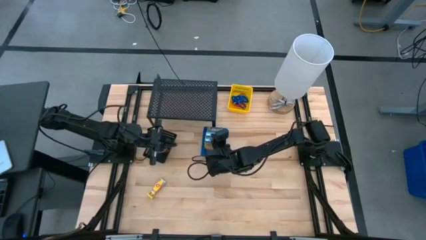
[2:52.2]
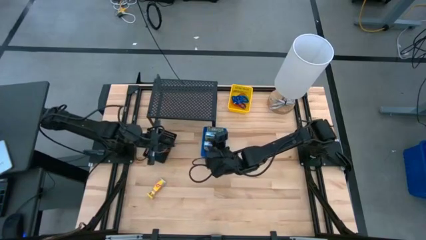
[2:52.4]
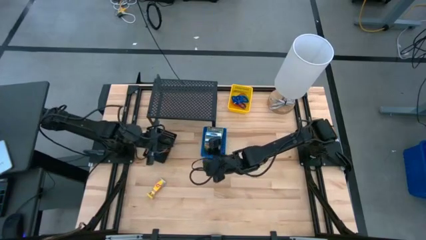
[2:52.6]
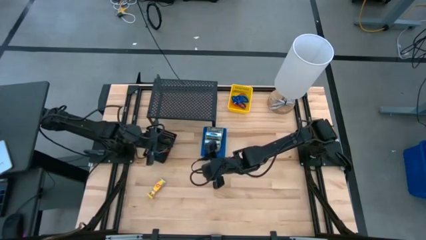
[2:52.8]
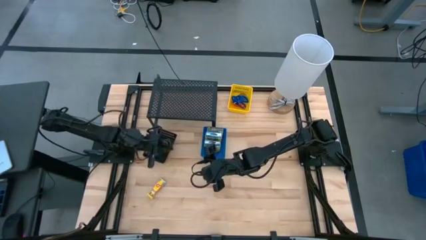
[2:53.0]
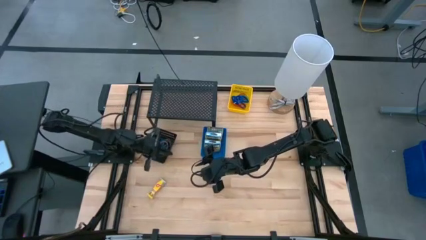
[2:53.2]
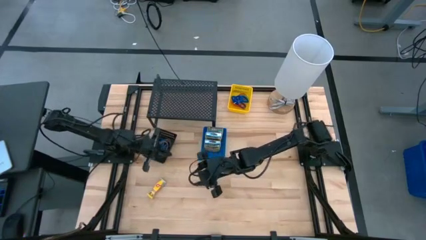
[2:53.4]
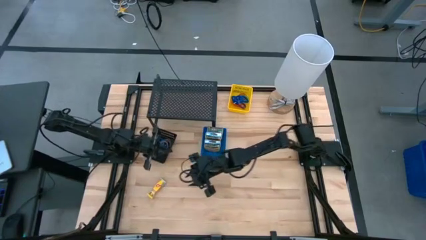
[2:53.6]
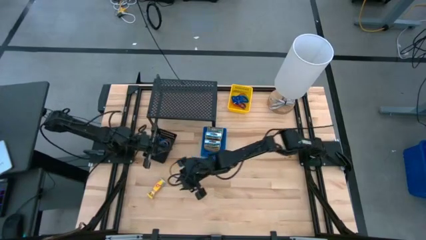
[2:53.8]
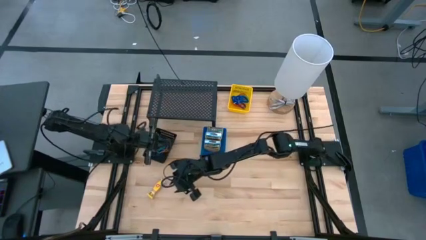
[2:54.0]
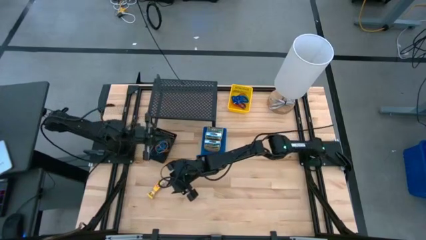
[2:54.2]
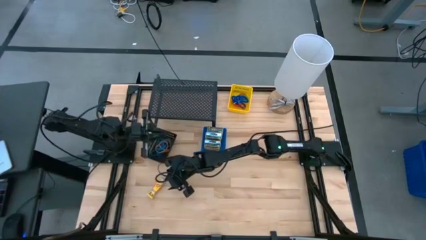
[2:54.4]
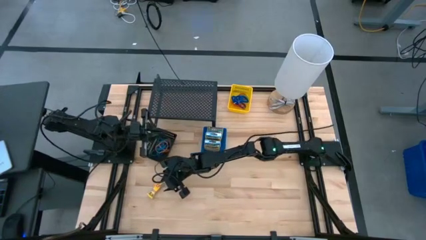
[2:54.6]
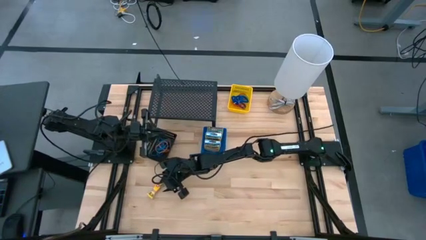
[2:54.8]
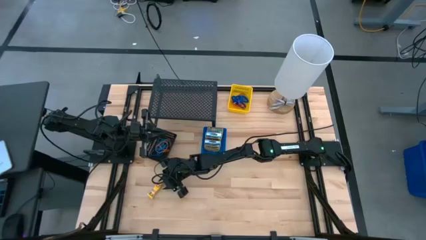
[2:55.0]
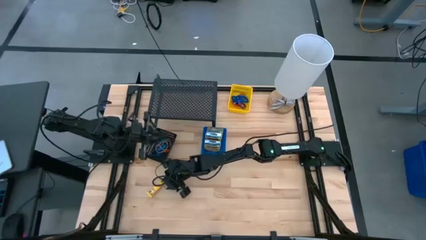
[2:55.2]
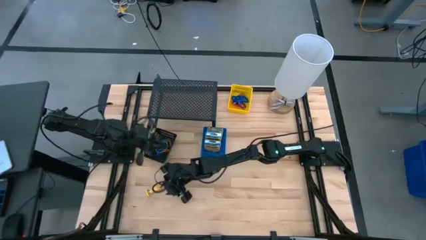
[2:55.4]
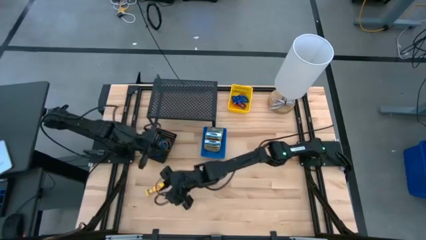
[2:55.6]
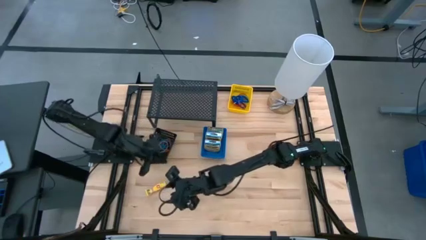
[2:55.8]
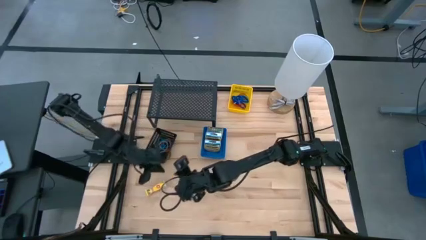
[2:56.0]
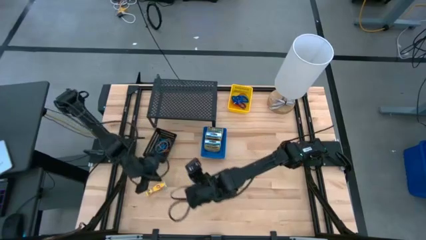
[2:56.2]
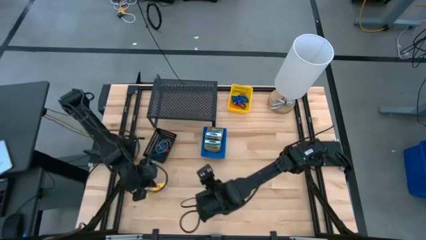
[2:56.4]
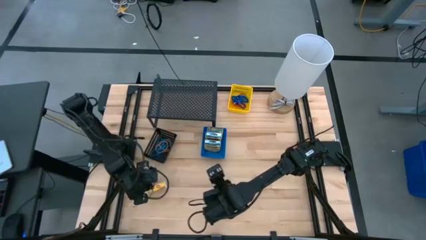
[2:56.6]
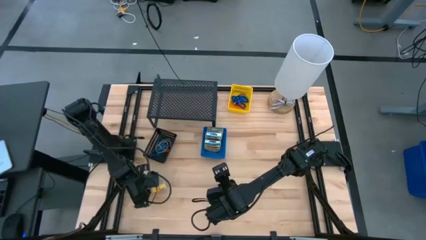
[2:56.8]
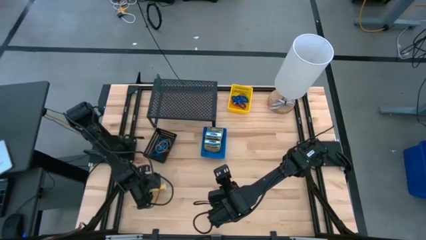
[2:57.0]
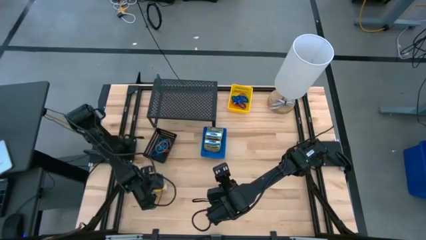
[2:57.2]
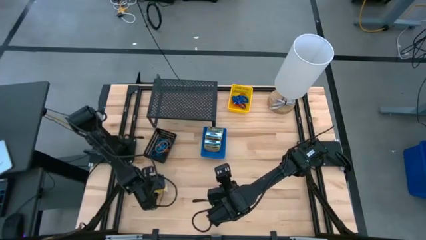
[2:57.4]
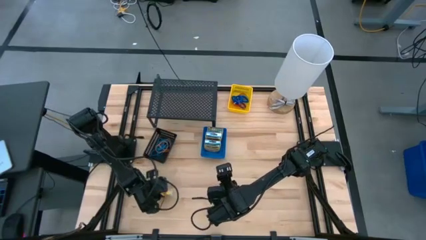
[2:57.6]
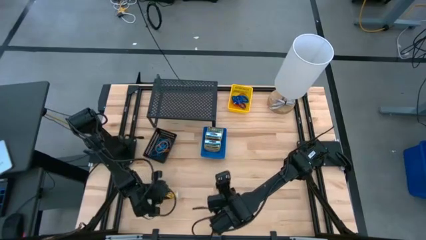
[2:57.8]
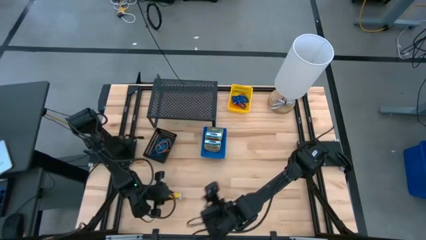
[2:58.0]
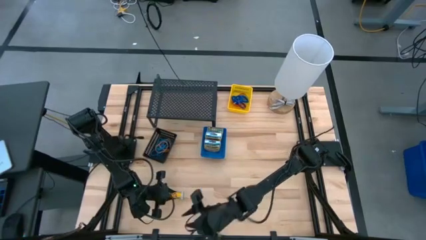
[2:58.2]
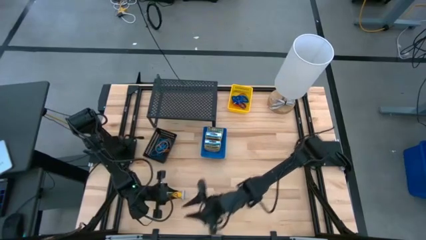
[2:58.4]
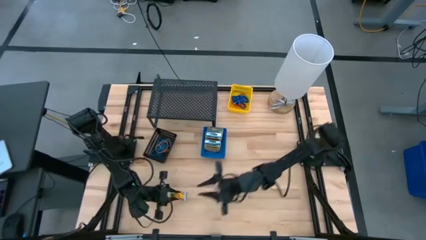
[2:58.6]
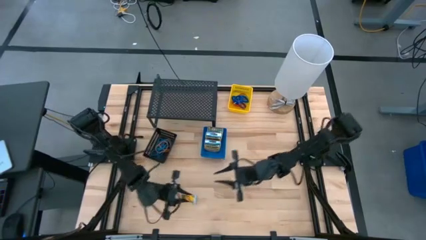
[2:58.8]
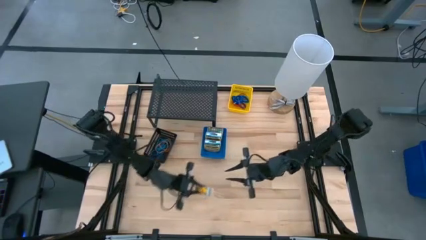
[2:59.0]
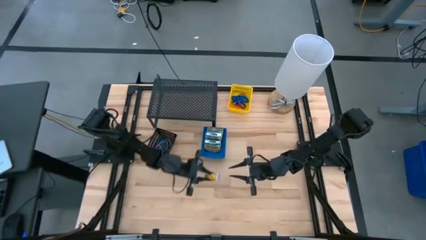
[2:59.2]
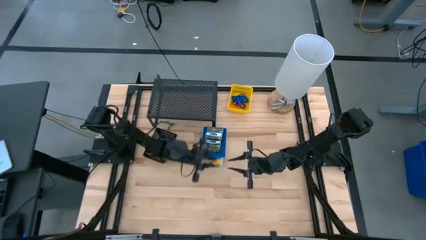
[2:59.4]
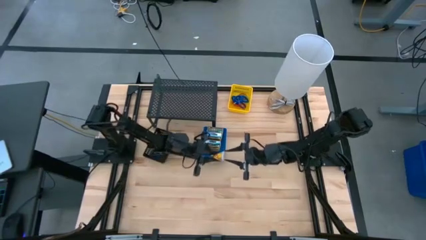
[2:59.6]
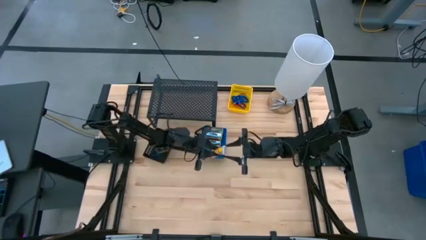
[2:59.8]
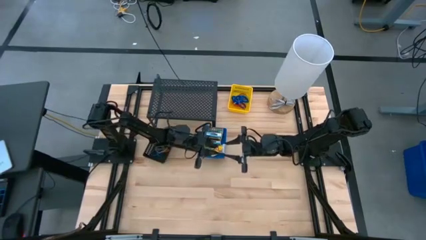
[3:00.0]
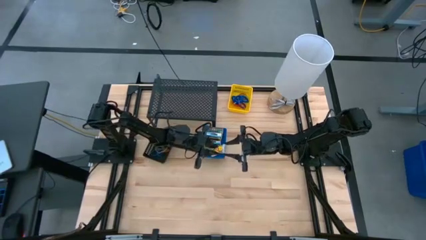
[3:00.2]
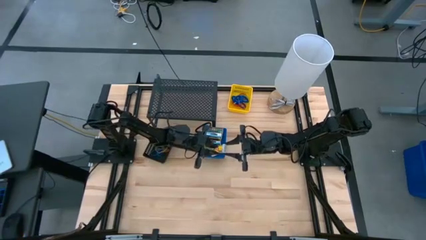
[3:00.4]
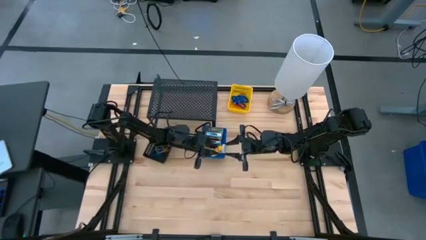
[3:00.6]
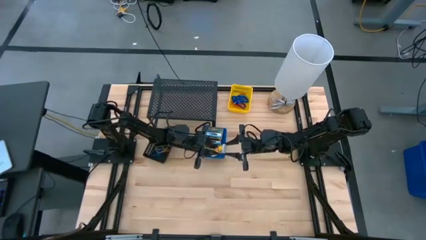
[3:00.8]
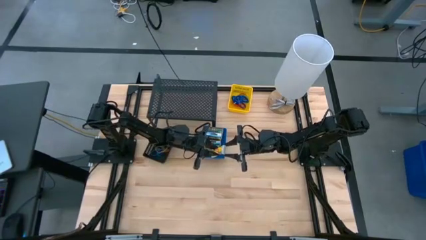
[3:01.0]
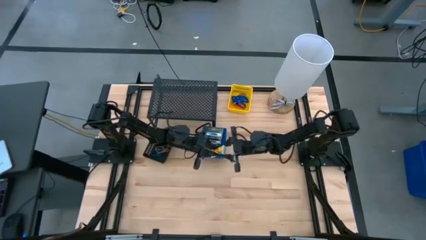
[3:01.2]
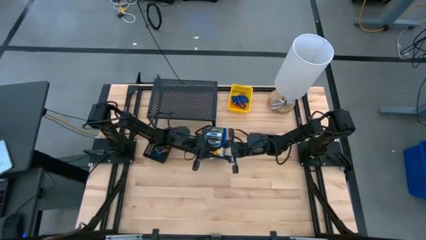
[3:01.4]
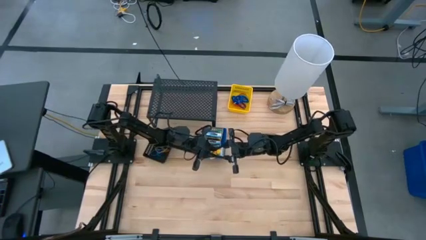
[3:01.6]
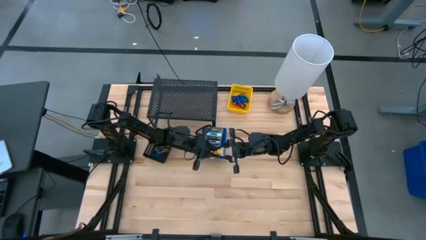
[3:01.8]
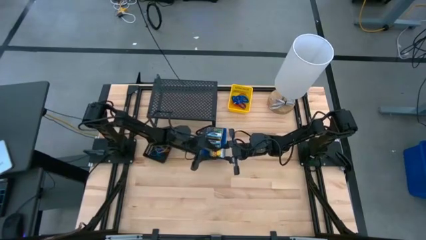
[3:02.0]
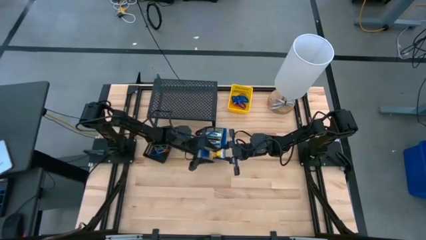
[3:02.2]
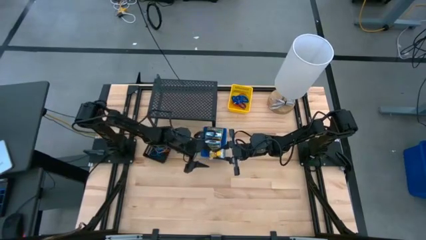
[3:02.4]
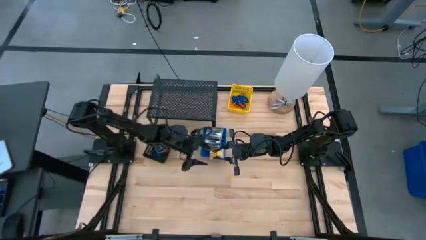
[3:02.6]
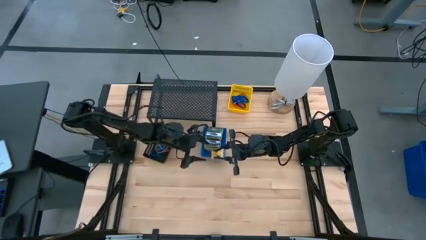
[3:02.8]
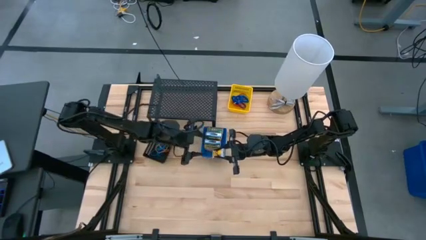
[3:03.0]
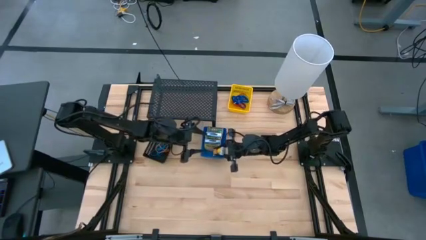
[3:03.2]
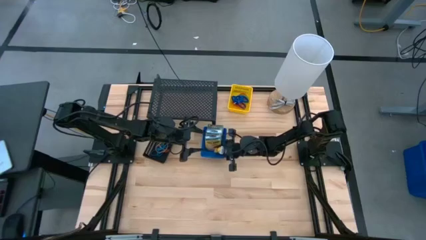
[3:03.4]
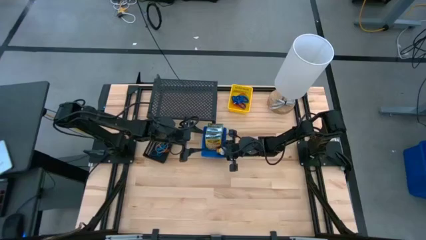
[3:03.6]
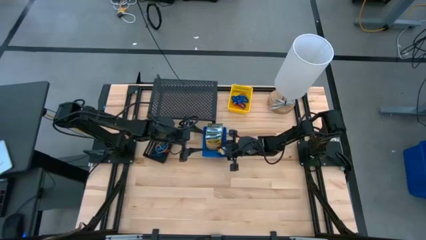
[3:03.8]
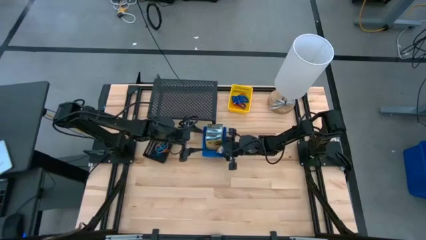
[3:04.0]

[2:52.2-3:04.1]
Task: Pick & Place Office Desk Supplies
Put the small yellow crayon box into the blue bin

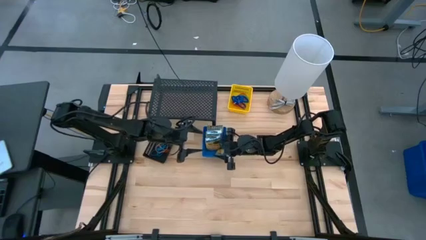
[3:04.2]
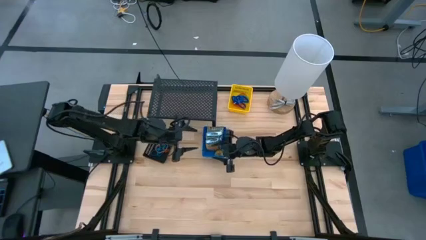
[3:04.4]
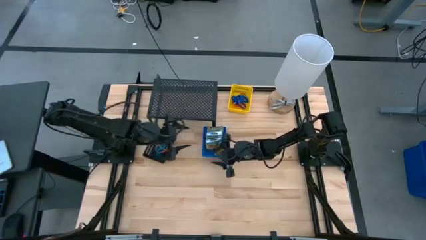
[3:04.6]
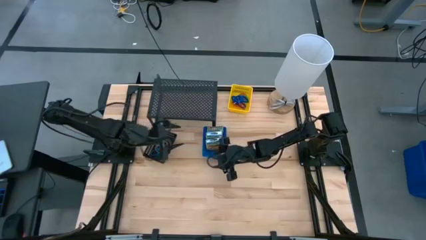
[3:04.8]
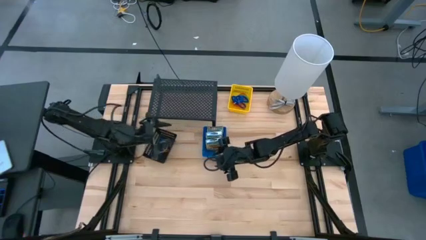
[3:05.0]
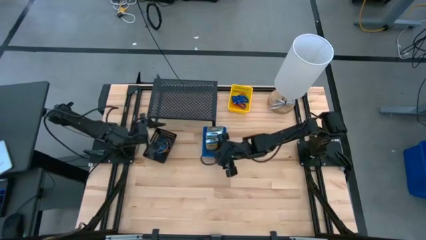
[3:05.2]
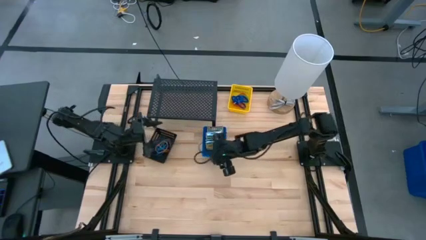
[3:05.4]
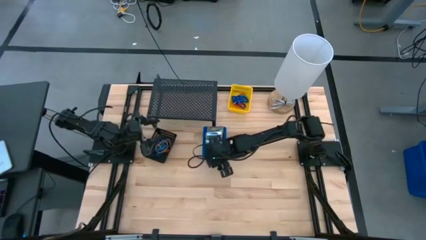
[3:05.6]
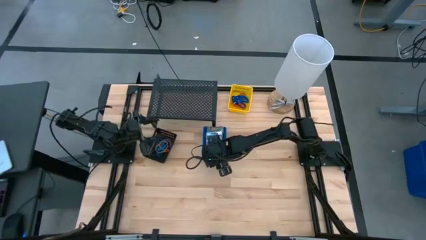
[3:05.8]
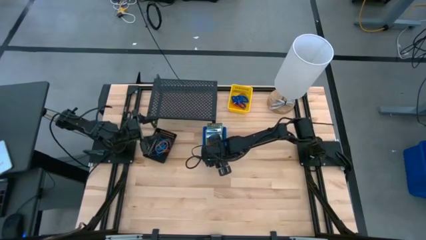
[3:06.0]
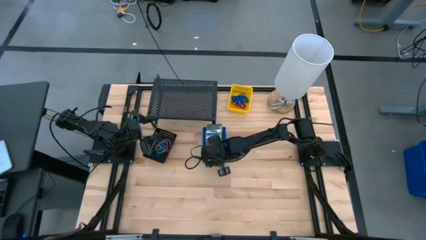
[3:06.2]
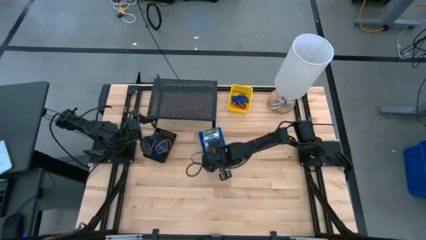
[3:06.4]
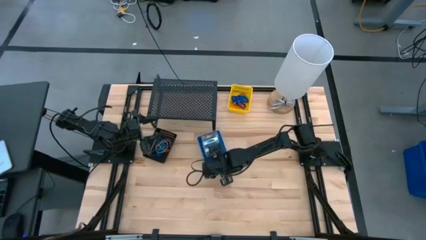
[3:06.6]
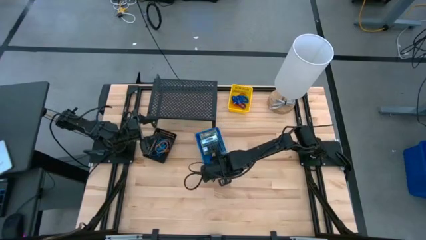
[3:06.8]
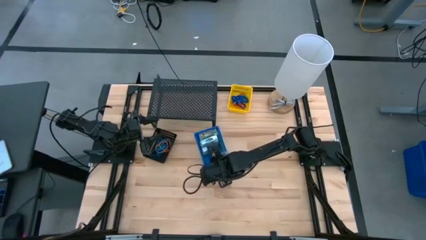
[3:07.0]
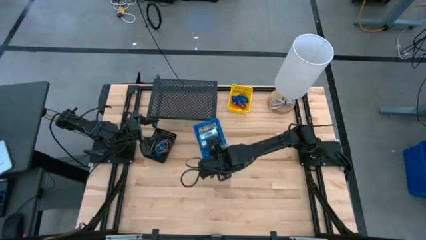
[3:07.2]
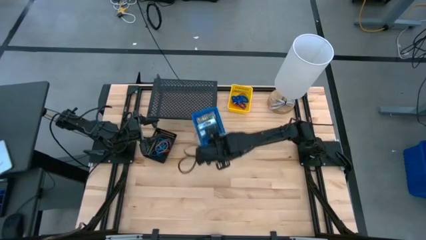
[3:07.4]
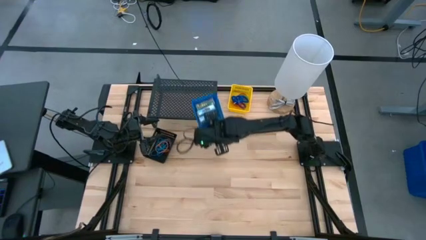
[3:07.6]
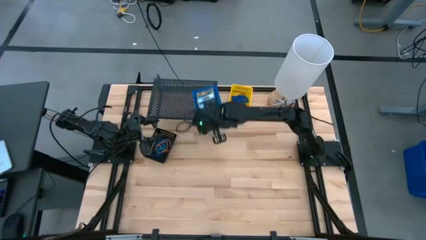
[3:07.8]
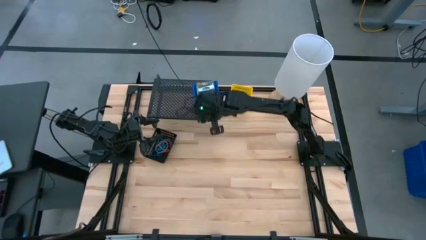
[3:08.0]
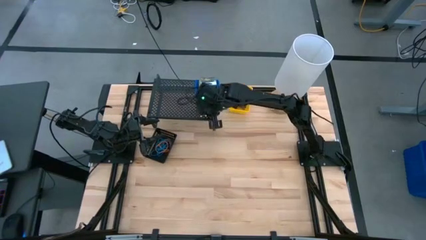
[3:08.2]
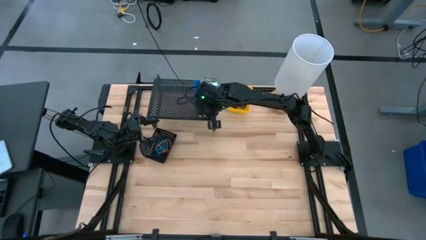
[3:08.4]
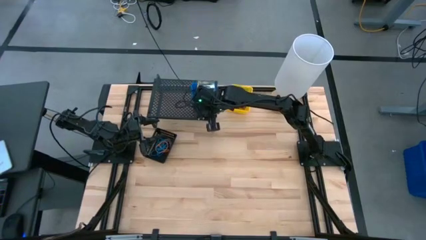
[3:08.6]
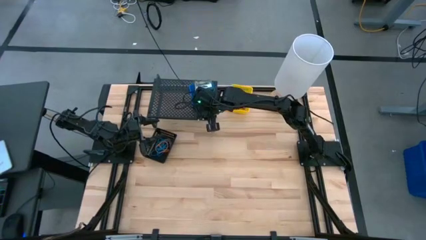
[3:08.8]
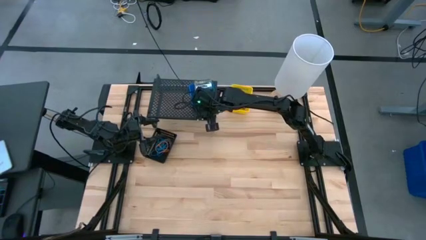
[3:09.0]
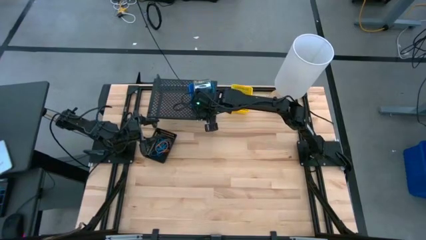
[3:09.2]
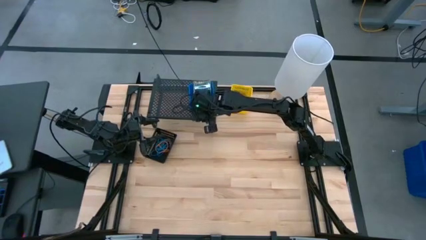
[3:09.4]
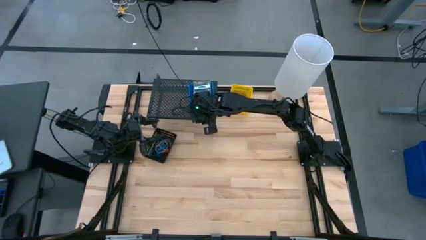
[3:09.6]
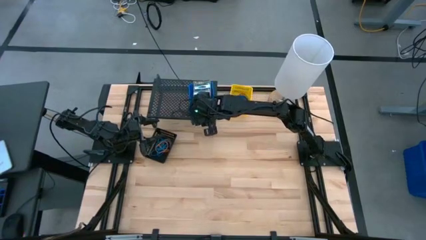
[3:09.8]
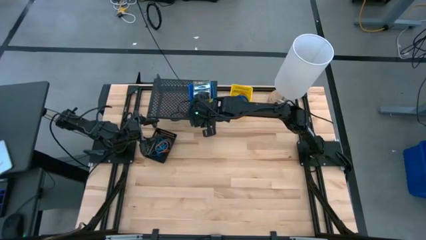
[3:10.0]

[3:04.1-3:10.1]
Put the blue bin on the shelf
